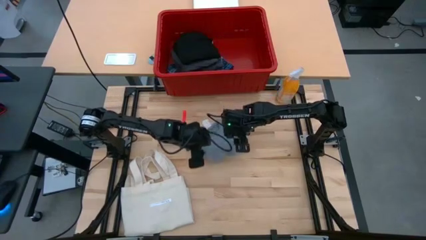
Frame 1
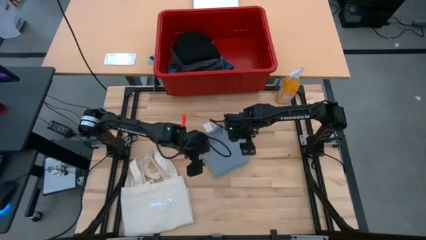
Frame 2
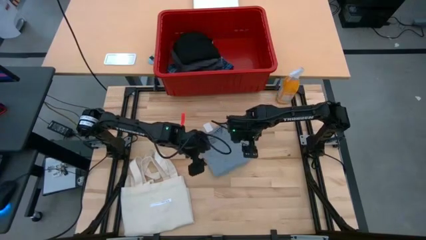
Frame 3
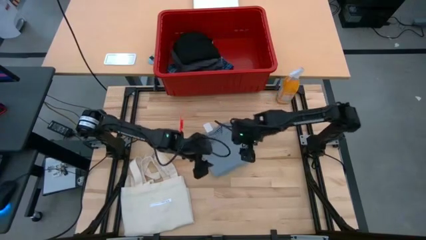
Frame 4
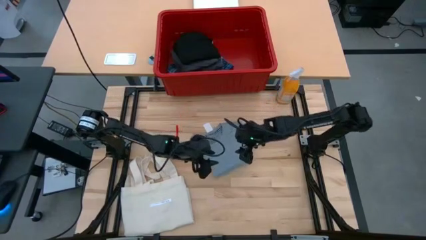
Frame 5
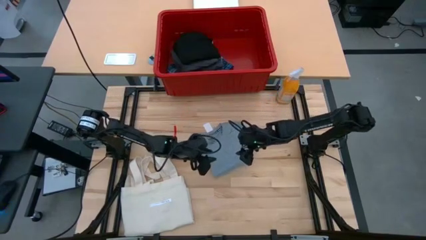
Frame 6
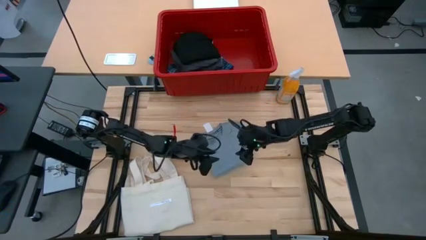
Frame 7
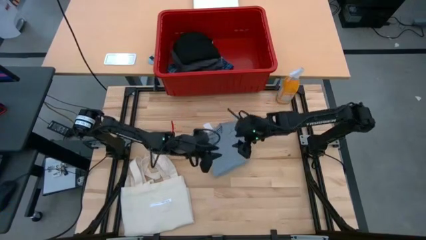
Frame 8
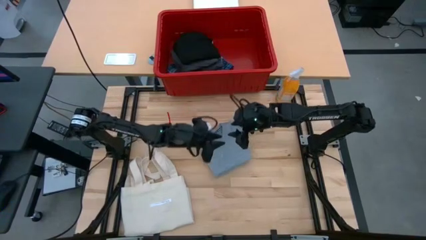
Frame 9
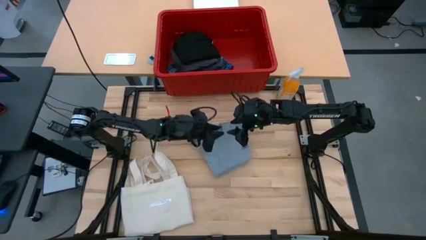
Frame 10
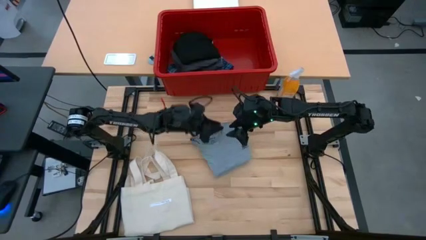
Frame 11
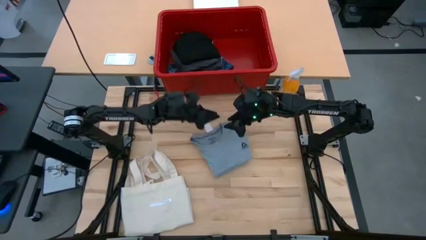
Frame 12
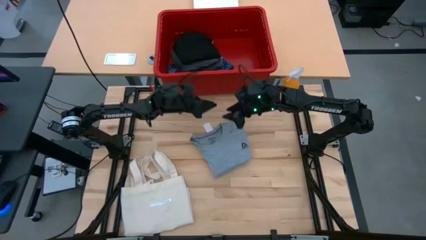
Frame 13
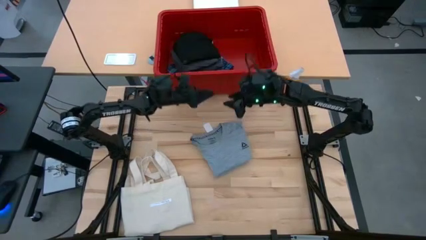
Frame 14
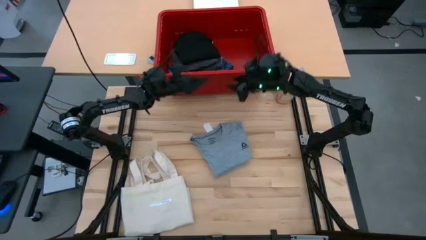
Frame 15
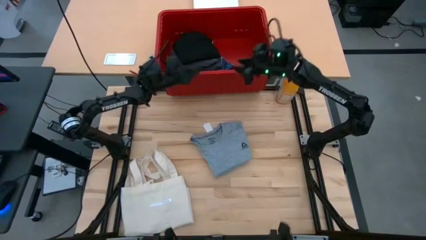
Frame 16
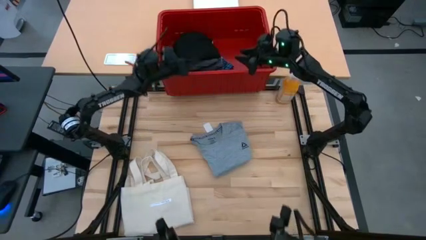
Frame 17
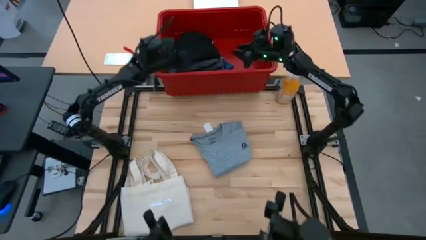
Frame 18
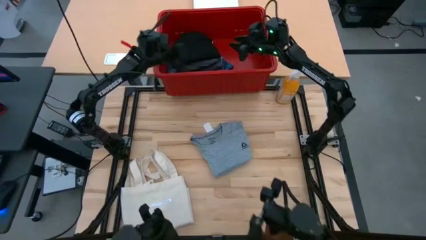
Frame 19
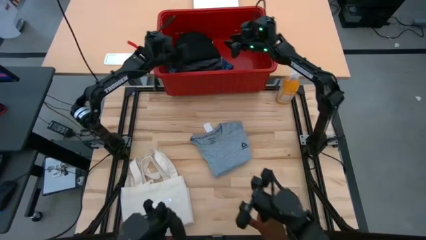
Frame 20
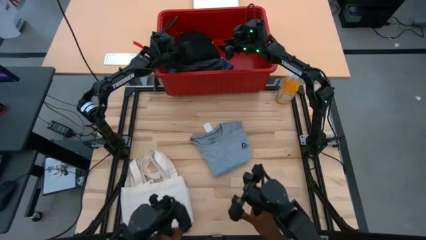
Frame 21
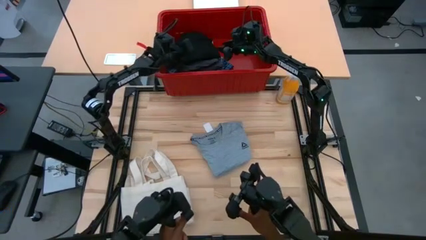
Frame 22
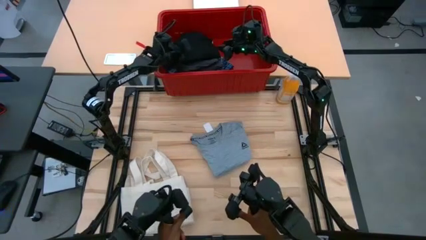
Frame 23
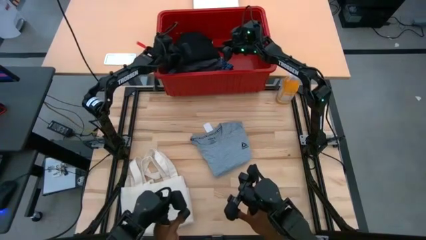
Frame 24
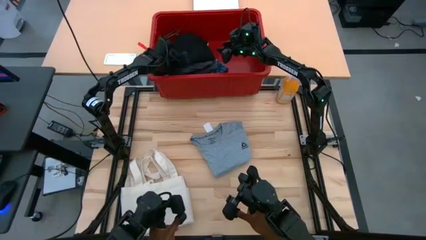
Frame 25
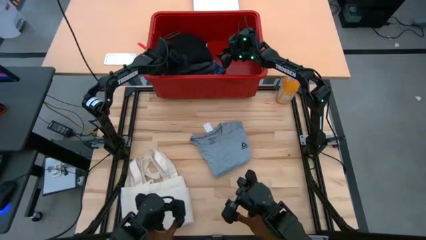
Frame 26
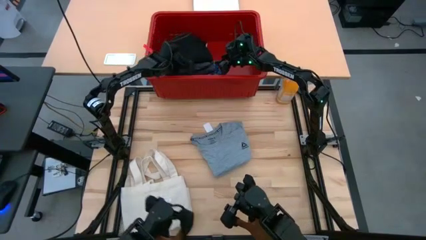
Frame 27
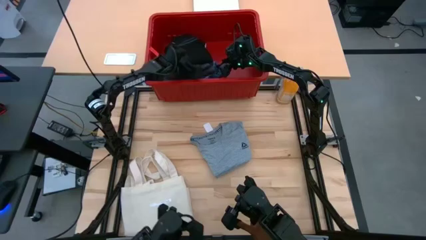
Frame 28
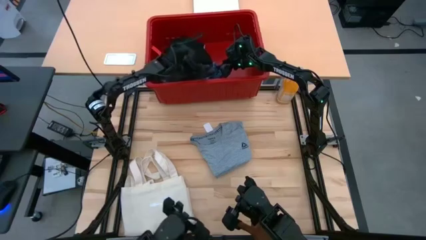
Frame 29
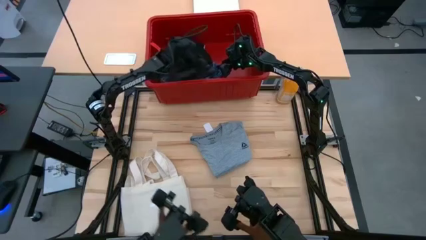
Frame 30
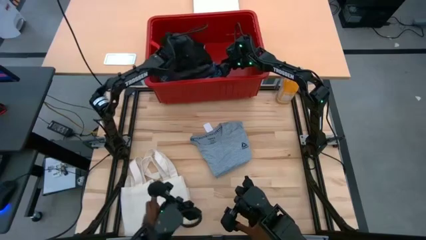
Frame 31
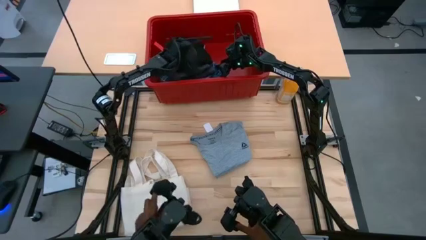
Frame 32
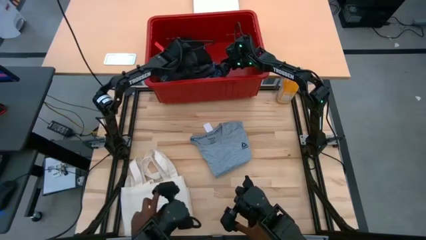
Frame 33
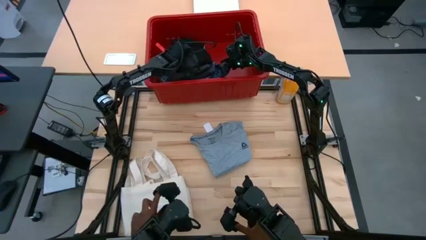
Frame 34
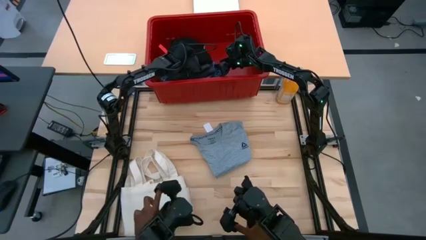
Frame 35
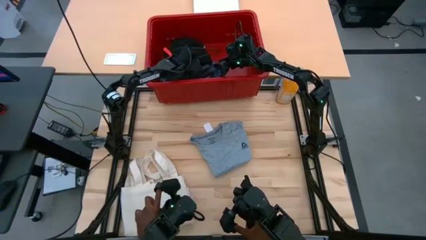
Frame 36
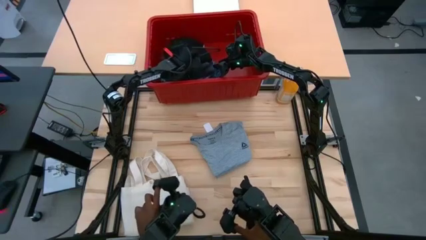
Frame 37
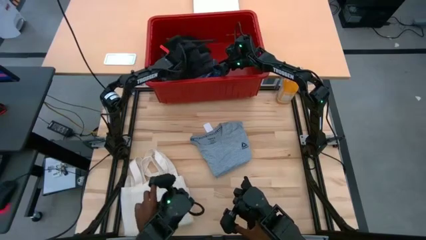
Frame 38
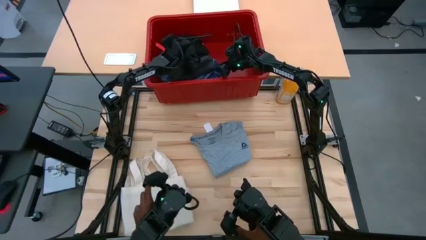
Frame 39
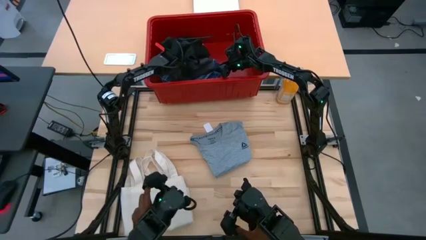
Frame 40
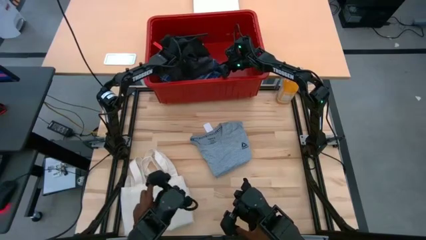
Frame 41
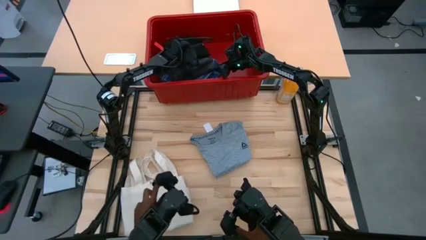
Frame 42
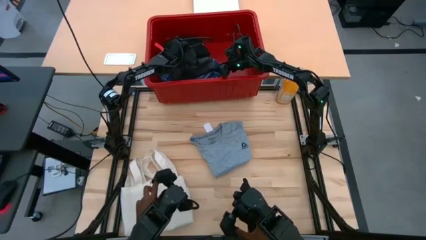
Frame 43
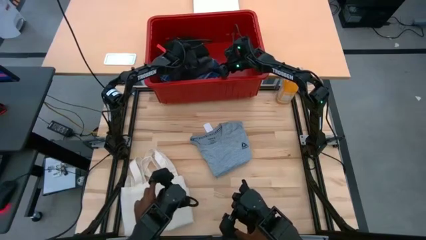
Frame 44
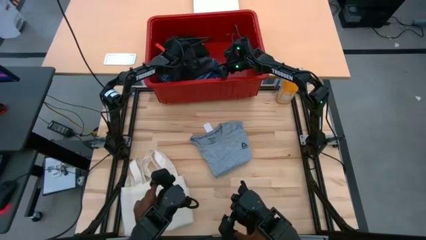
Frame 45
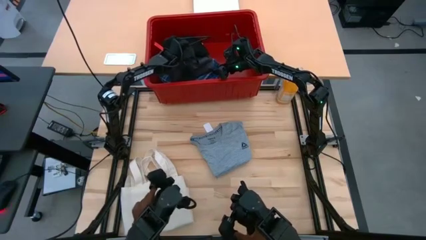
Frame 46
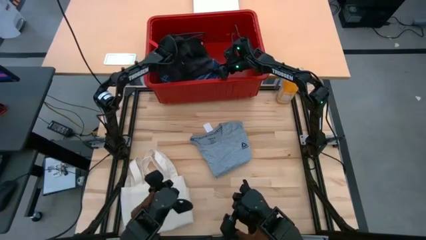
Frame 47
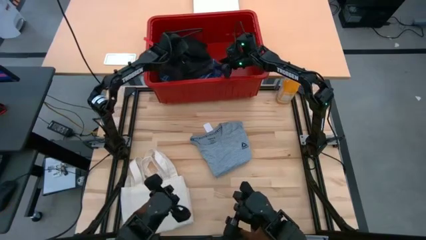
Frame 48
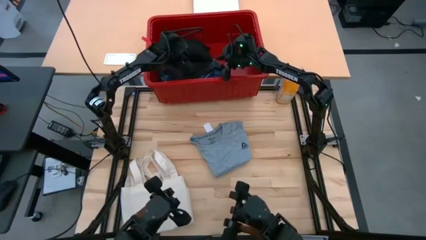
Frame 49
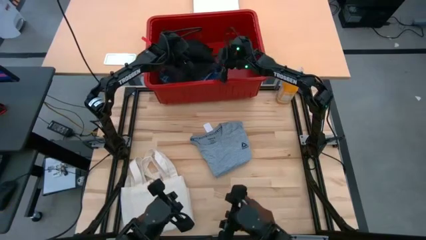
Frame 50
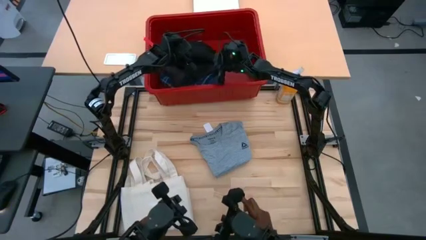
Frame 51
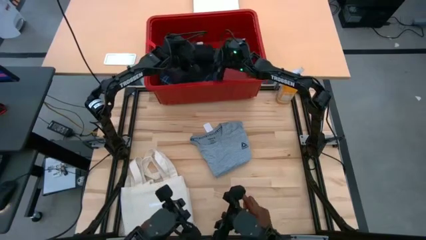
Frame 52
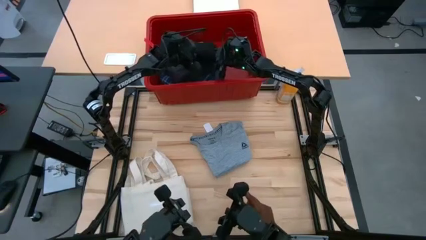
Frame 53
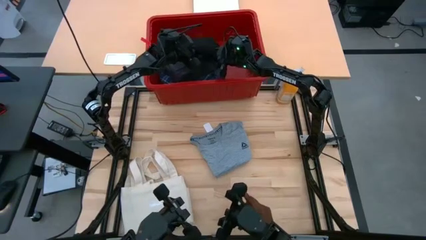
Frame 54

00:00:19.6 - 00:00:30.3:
Task: Fold laundry
Remove the black t-shirt from the red organizer bin
